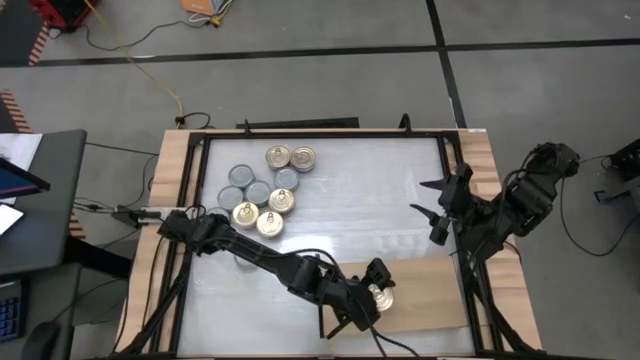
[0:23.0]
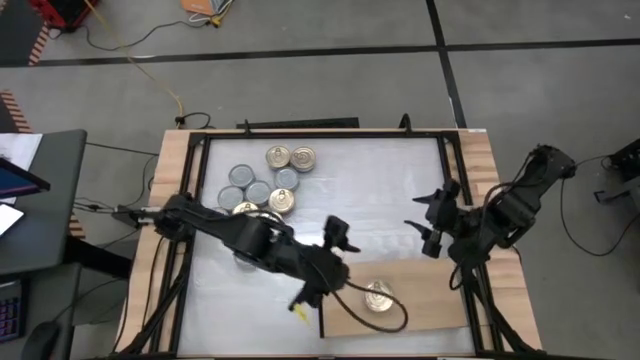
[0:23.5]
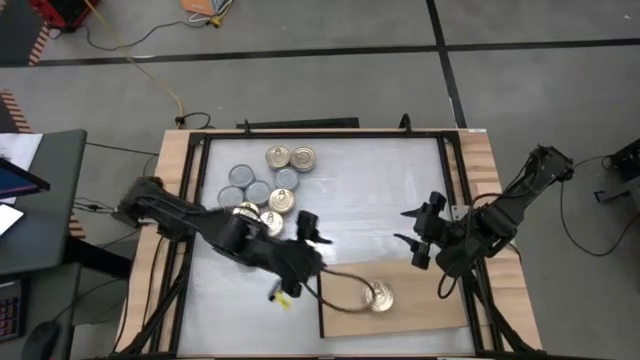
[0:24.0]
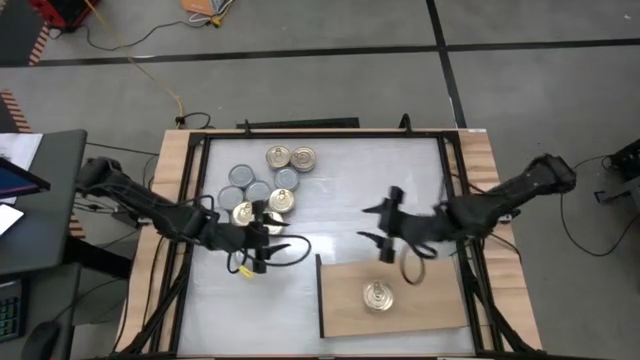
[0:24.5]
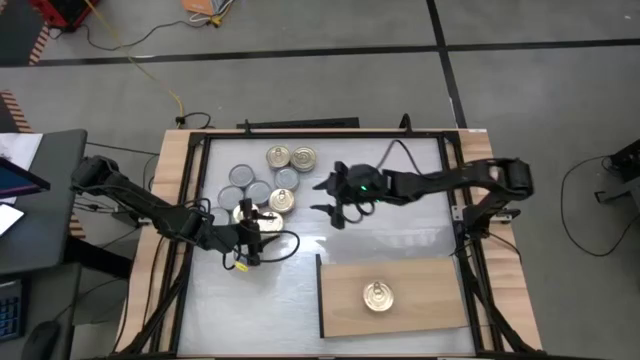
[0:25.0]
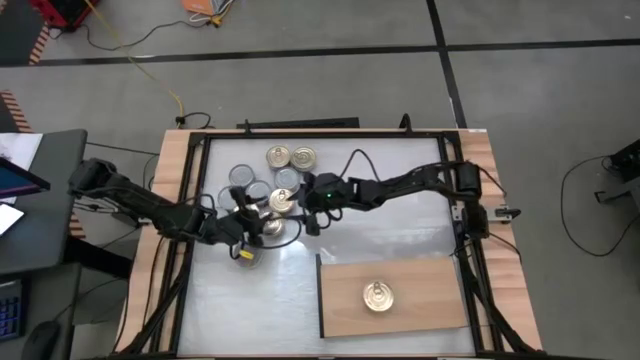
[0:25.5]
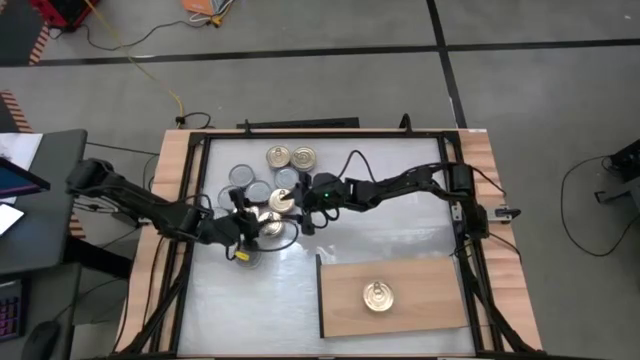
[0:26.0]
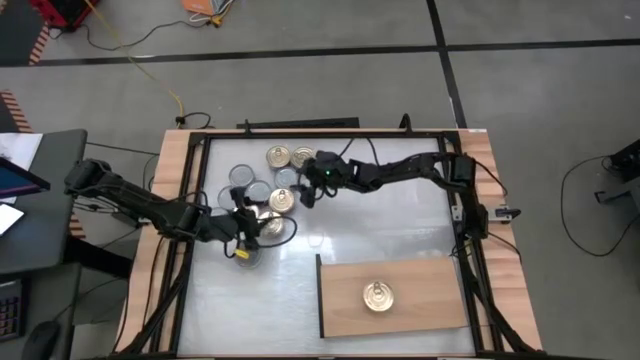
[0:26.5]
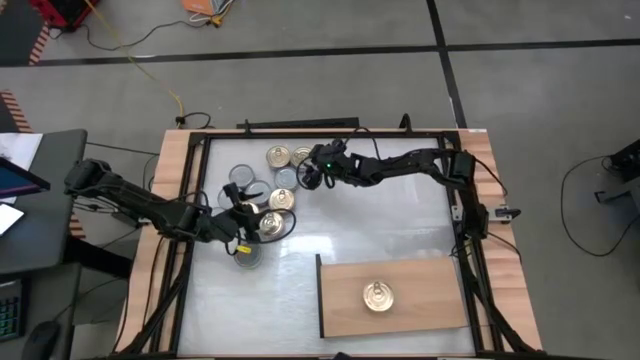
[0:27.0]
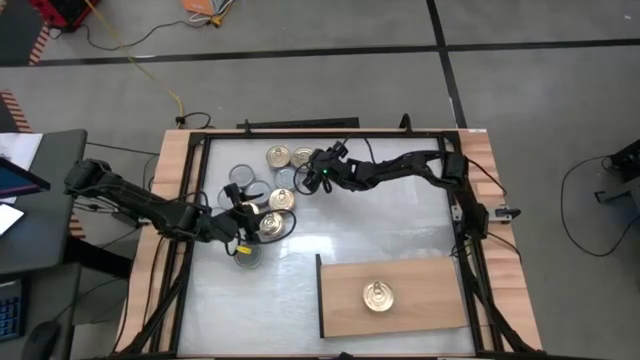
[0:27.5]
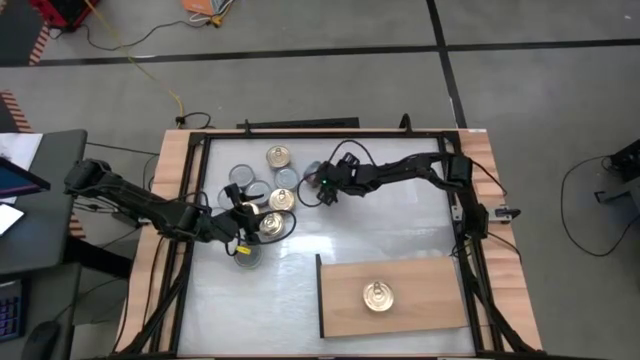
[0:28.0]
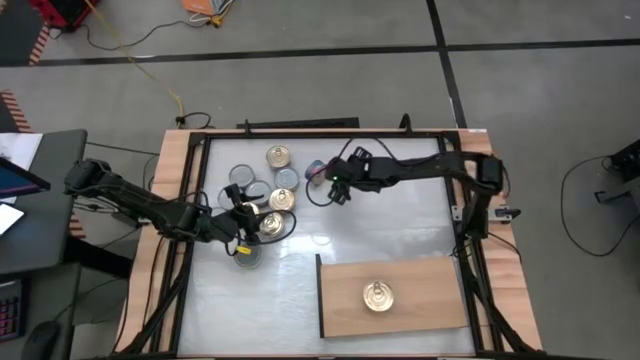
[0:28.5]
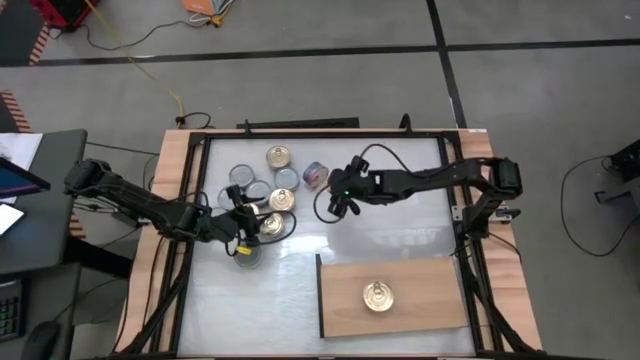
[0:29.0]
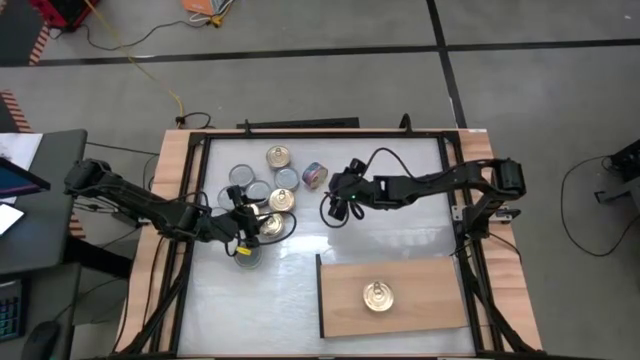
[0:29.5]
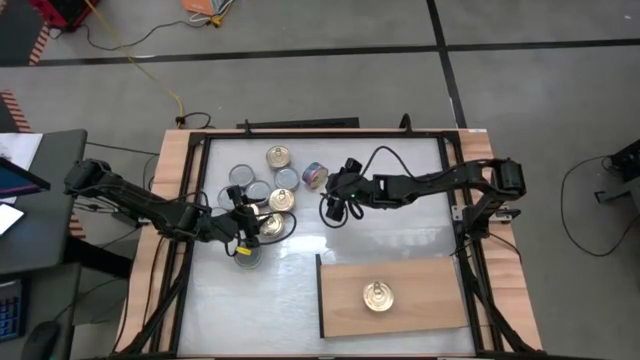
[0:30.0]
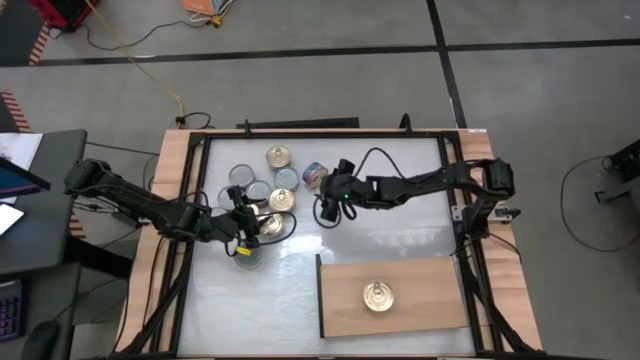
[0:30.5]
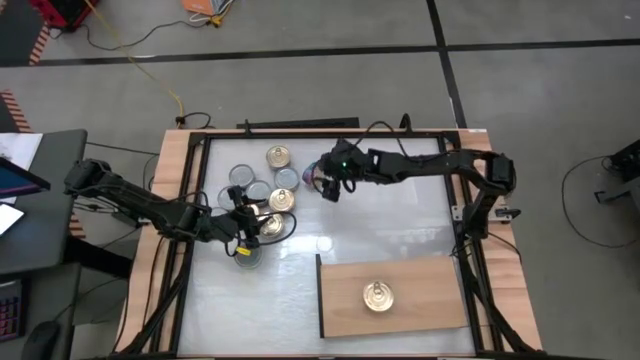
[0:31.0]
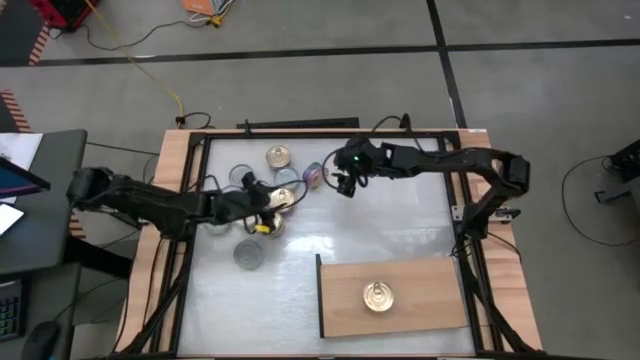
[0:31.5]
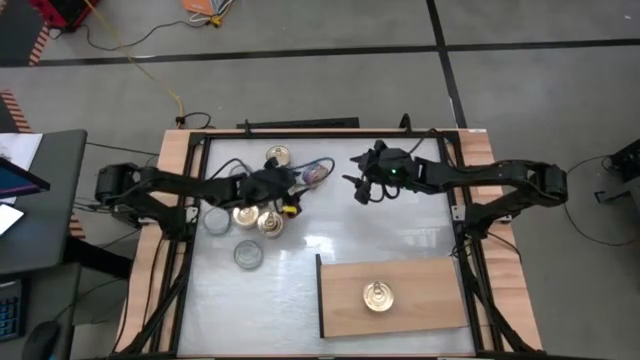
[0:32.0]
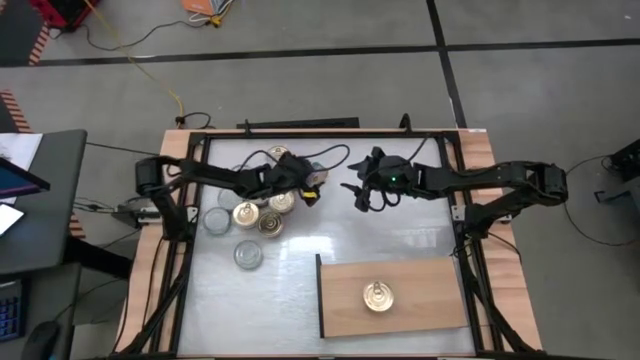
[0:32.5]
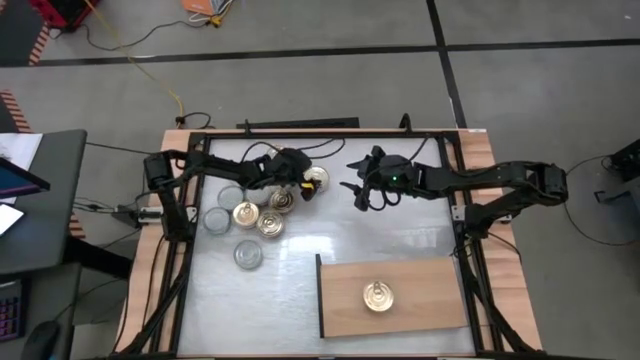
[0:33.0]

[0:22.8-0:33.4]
Task: Stack canned seafood by type on shelf
Stack the blue pink tuna can on top of the blue pink tuna can on the shelf

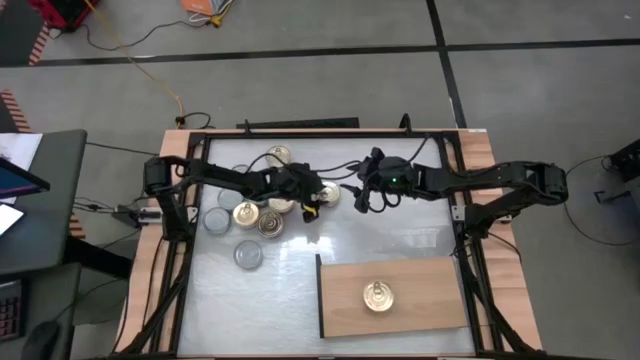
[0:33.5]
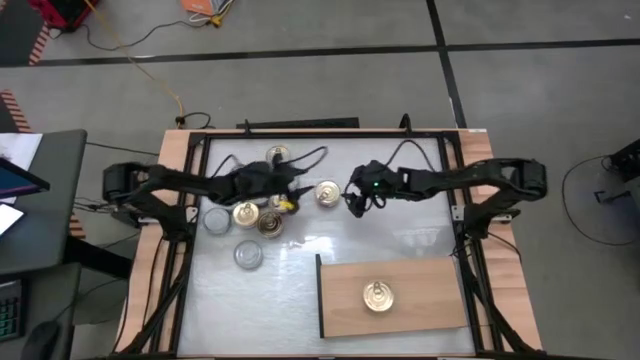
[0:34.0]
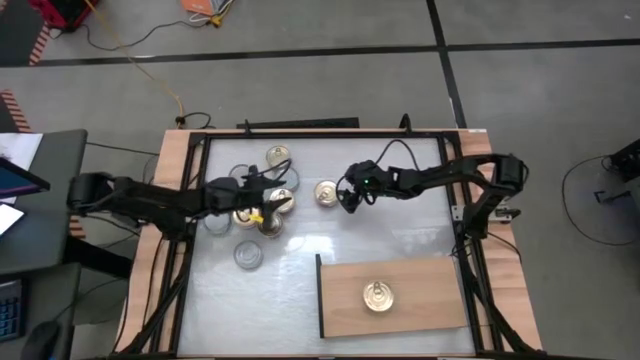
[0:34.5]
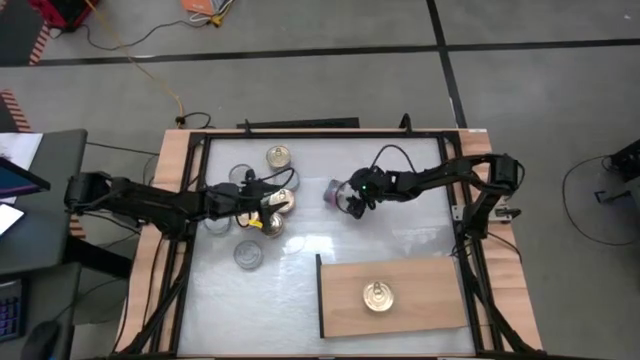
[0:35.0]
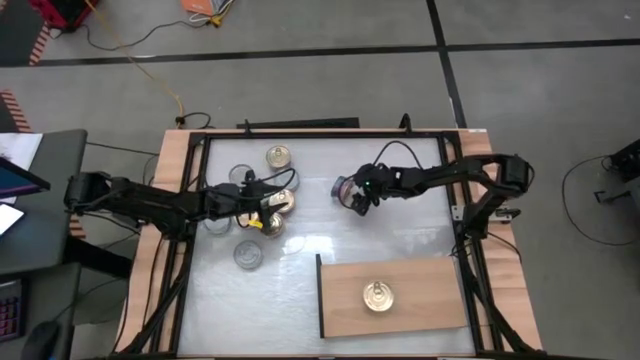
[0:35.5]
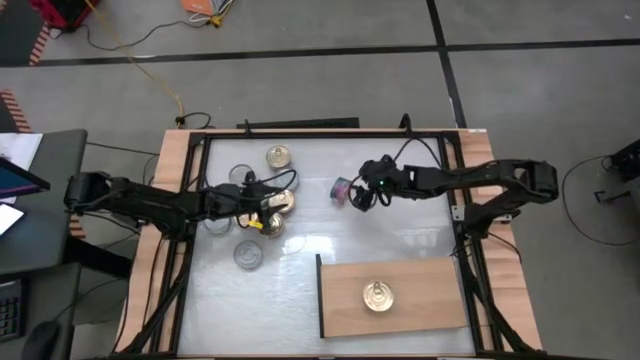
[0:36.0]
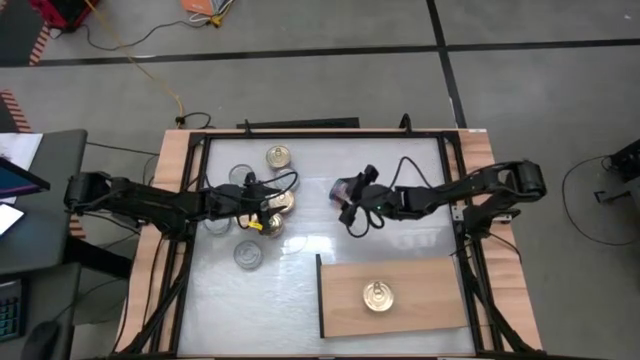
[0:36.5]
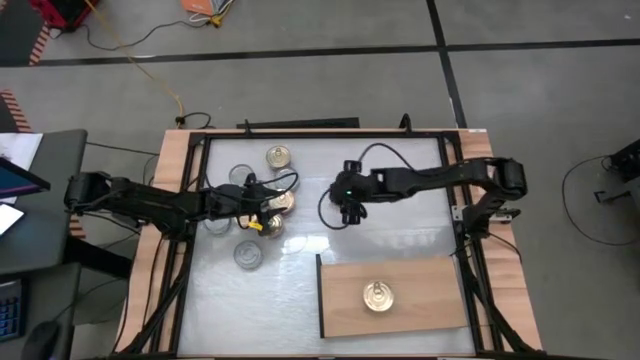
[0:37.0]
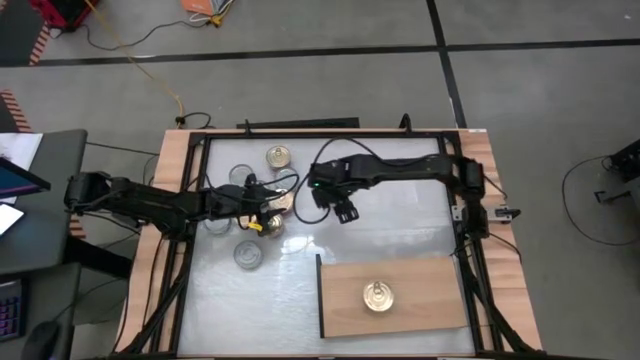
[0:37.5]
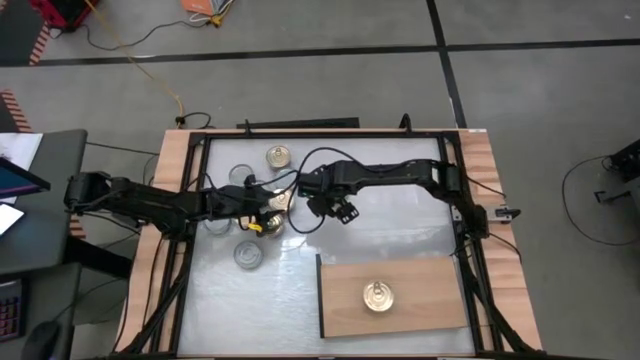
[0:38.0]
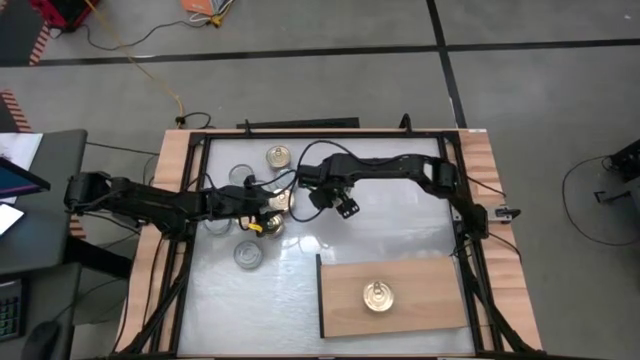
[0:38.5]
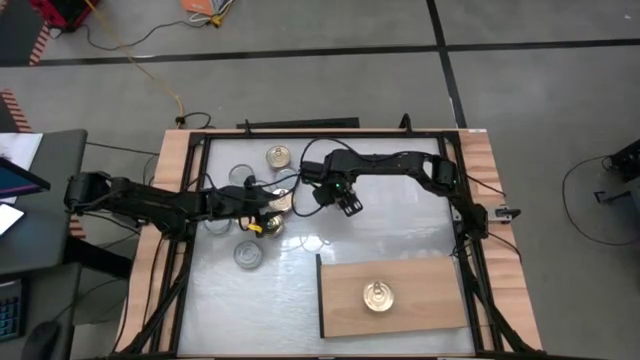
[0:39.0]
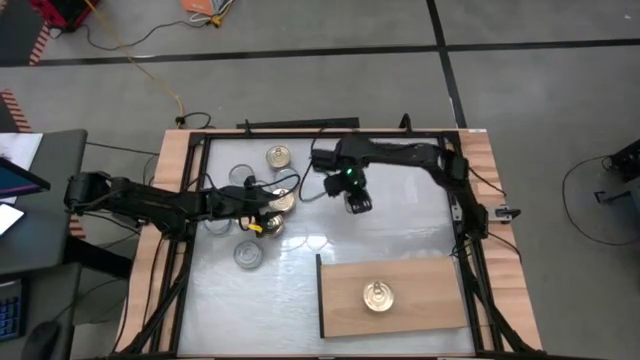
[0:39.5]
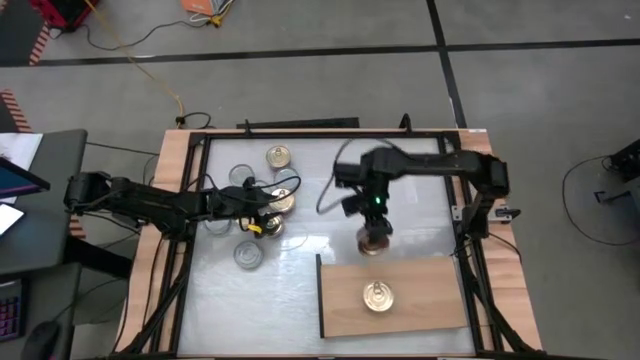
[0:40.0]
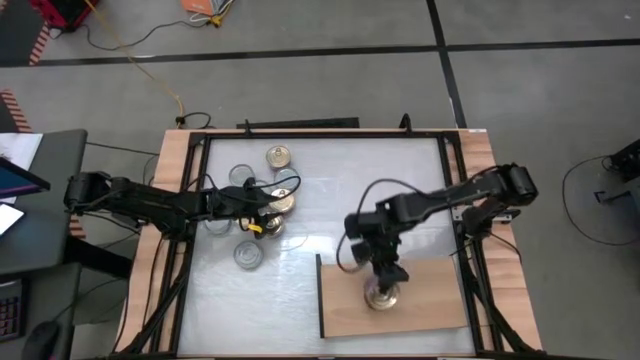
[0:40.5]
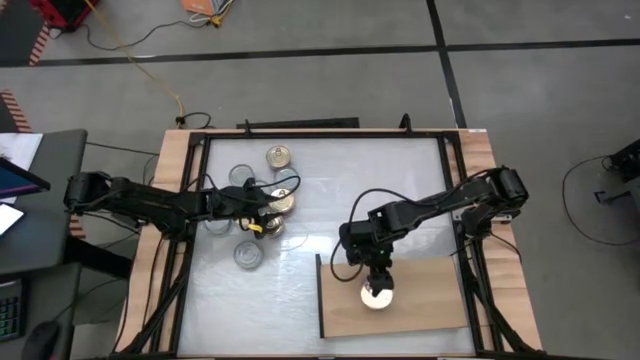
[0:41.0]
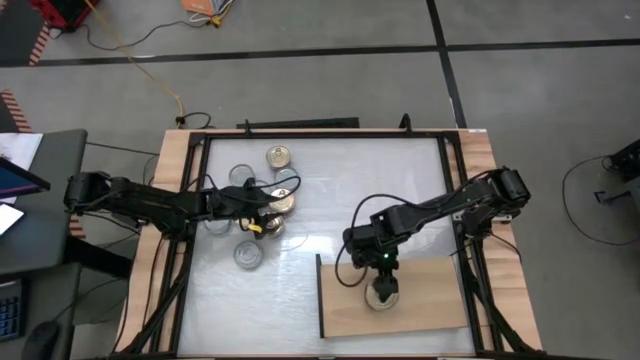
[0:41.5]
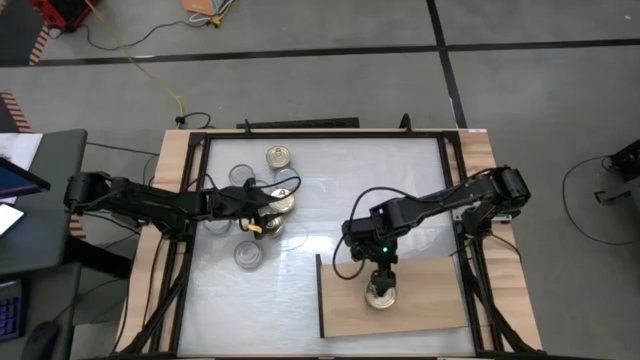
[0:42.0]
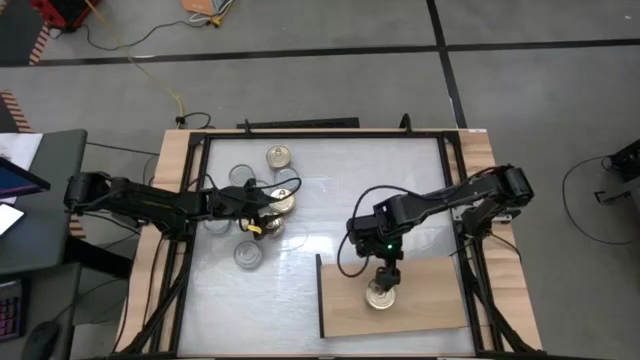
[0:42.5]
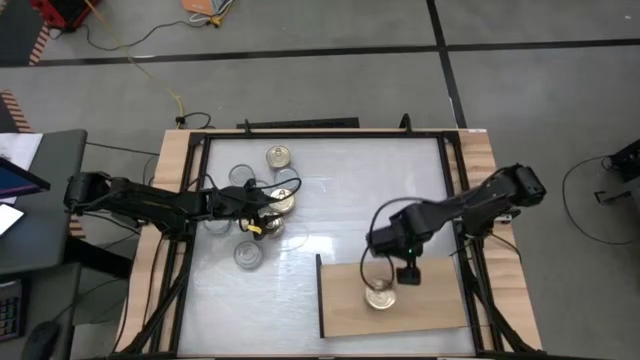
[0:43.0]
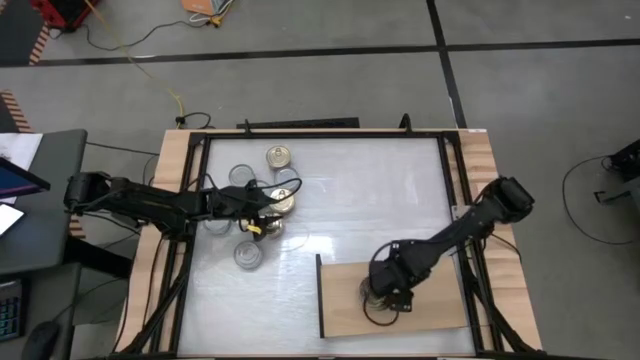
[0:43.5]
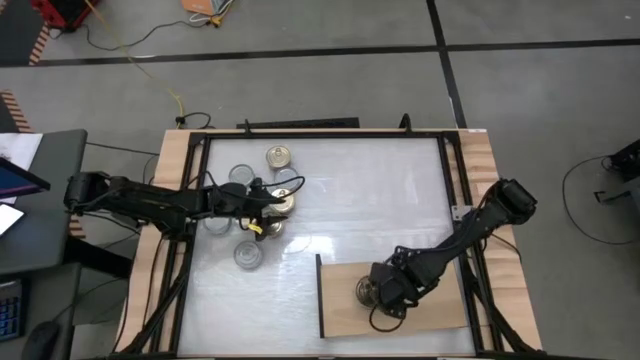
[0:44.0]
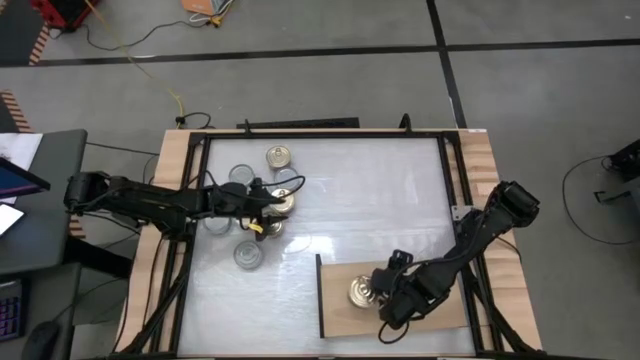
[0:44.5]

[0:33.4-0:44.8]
Stack the blue pink tuna can on top of the blue pink tuna can on the shelf
